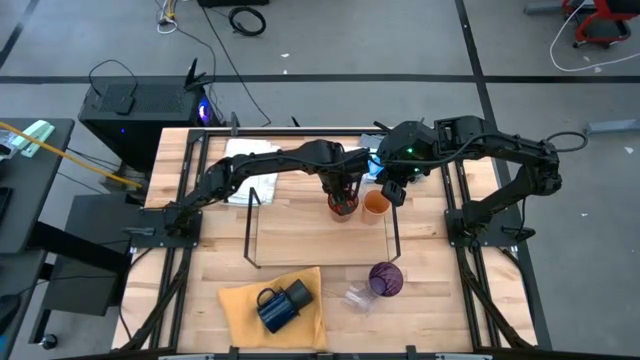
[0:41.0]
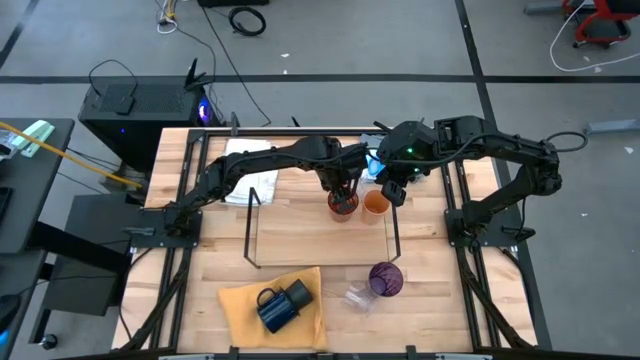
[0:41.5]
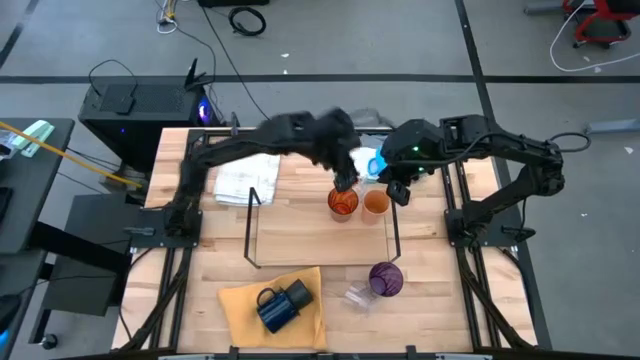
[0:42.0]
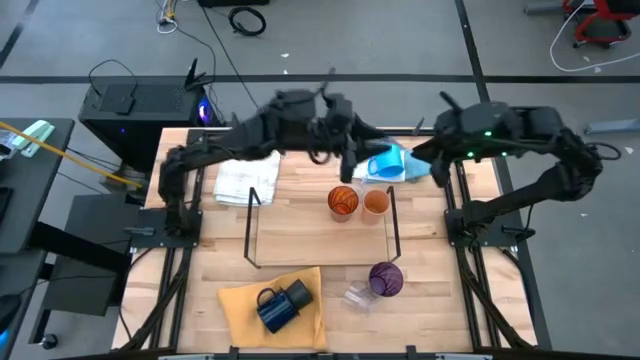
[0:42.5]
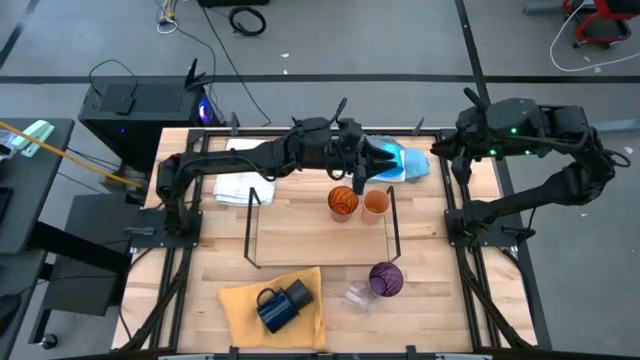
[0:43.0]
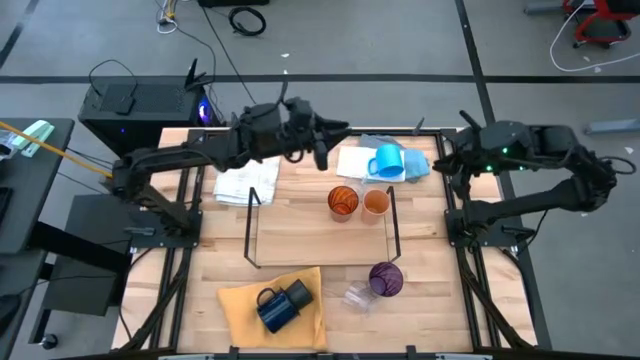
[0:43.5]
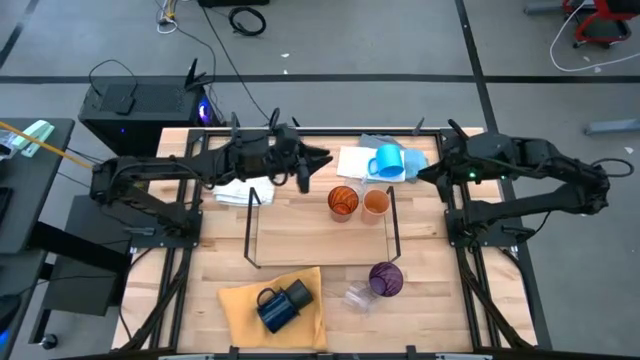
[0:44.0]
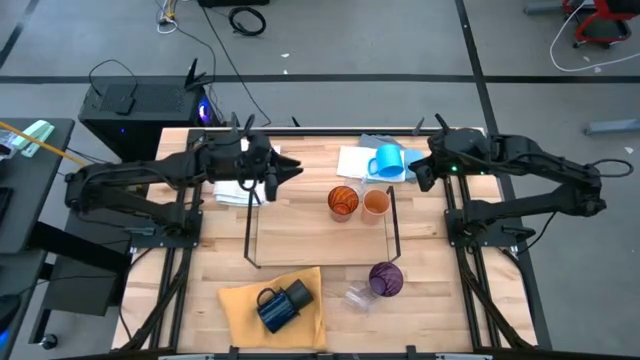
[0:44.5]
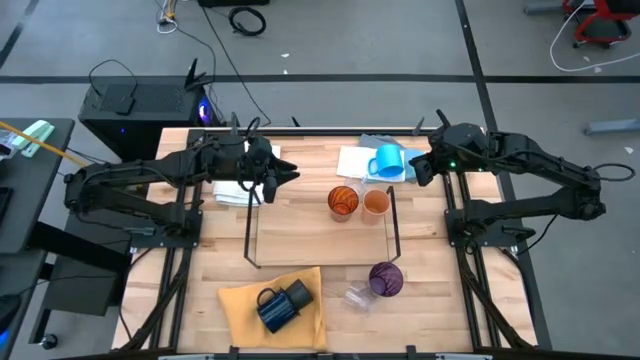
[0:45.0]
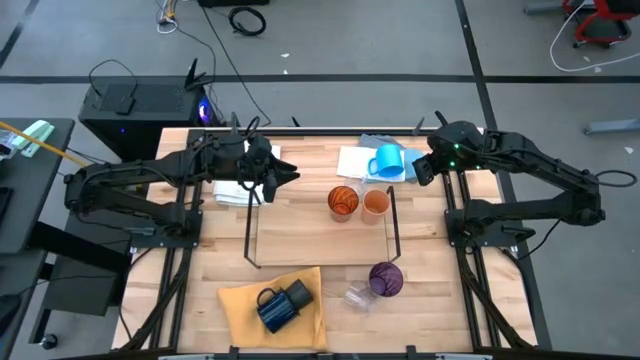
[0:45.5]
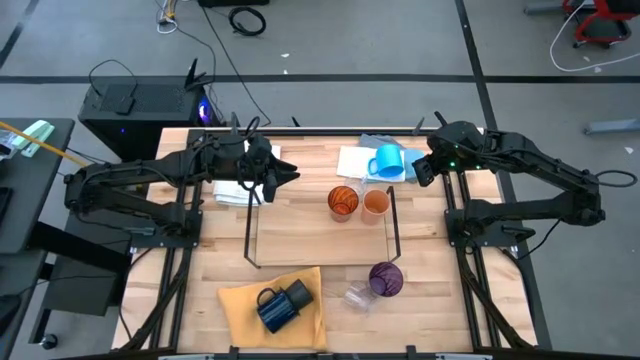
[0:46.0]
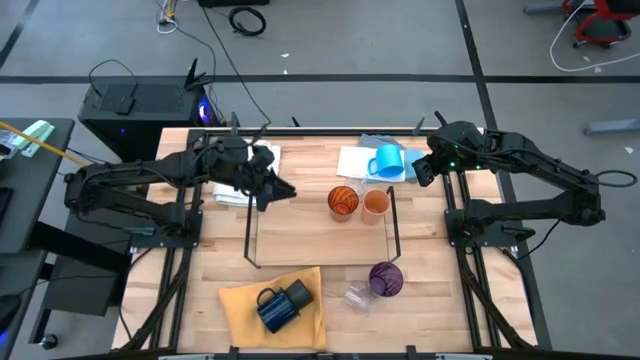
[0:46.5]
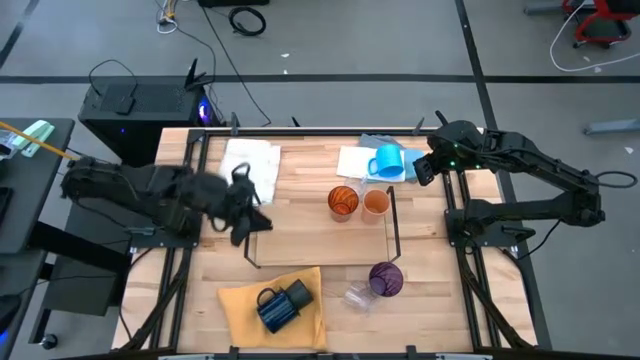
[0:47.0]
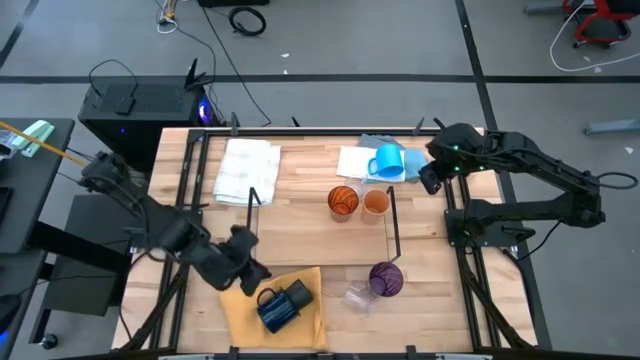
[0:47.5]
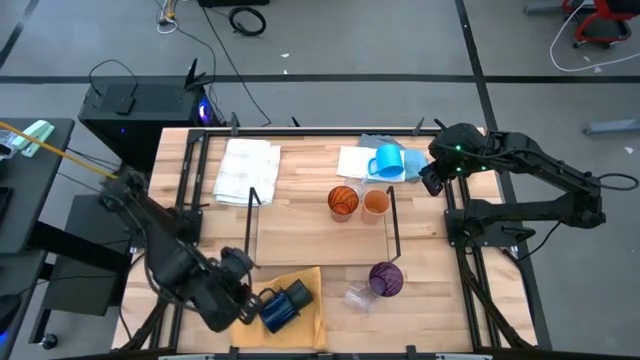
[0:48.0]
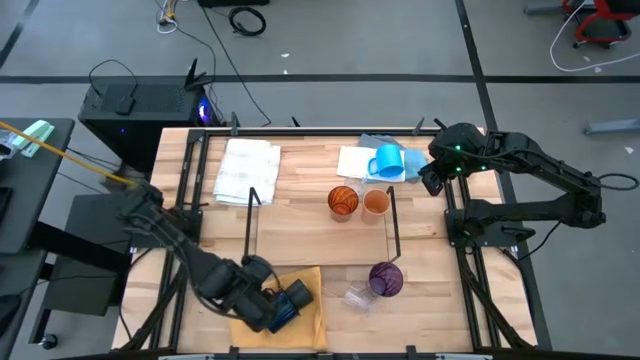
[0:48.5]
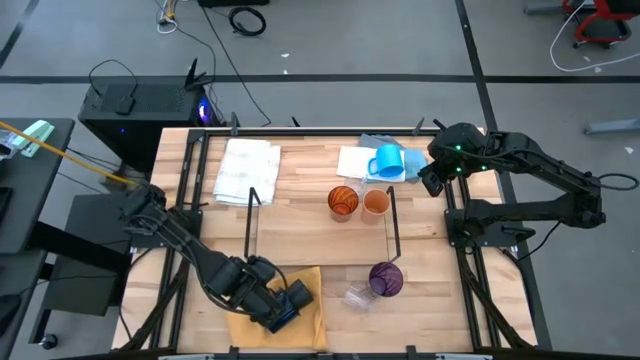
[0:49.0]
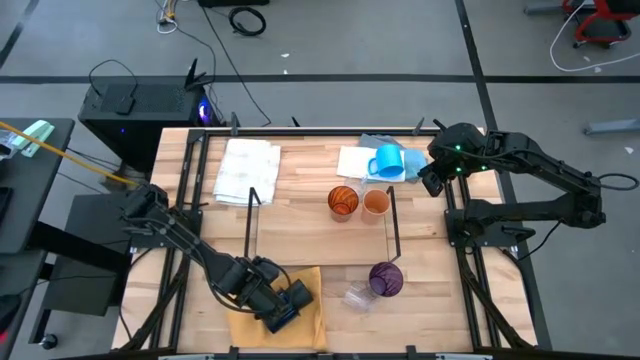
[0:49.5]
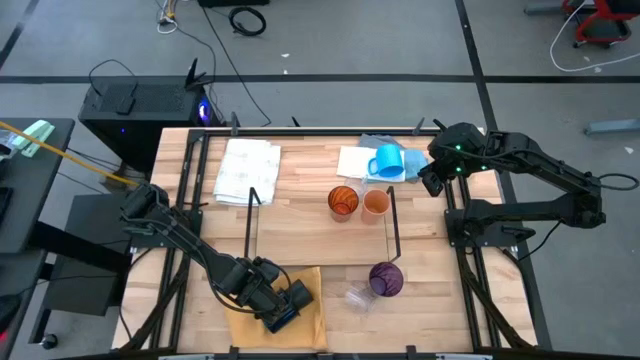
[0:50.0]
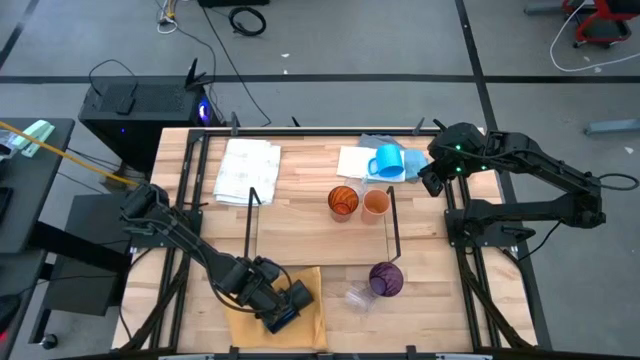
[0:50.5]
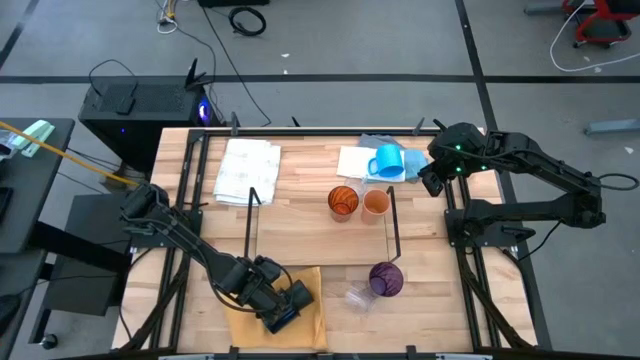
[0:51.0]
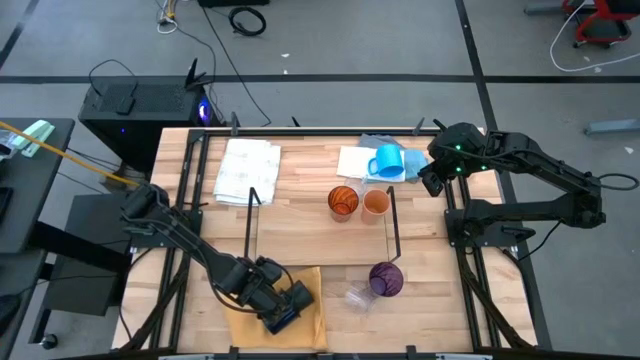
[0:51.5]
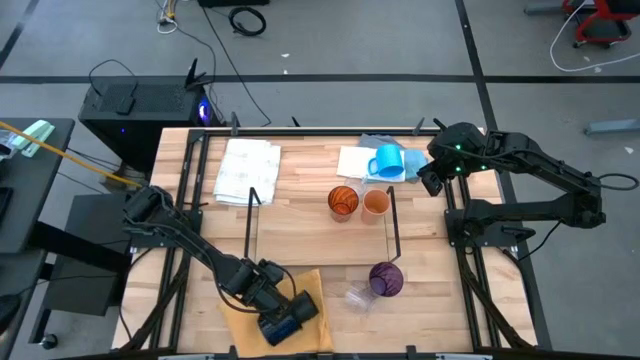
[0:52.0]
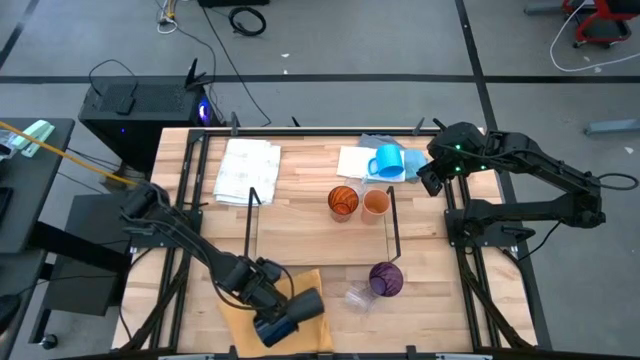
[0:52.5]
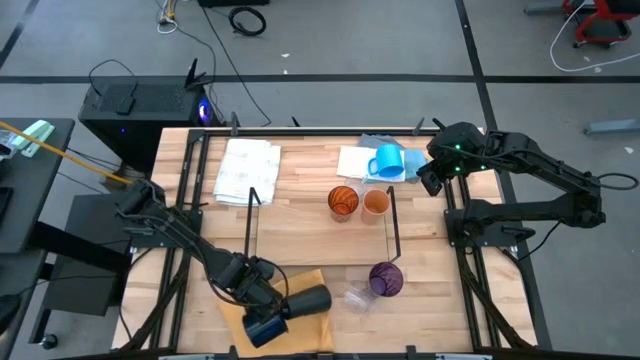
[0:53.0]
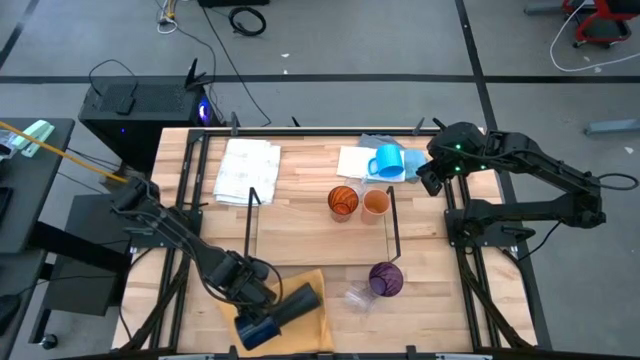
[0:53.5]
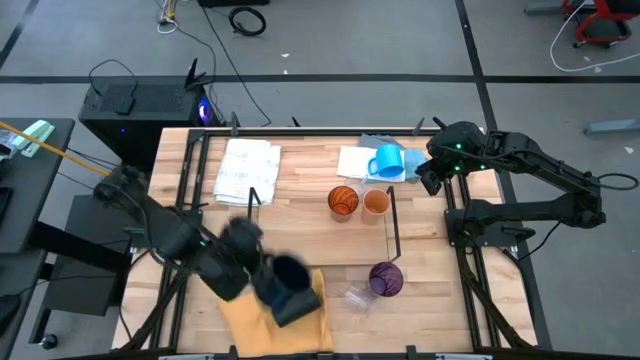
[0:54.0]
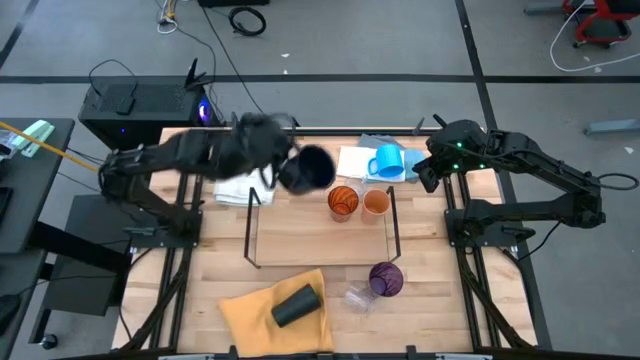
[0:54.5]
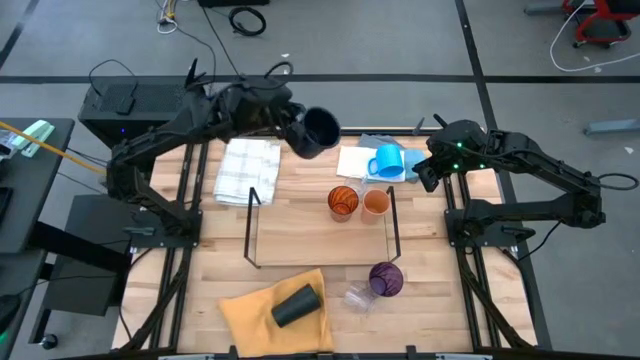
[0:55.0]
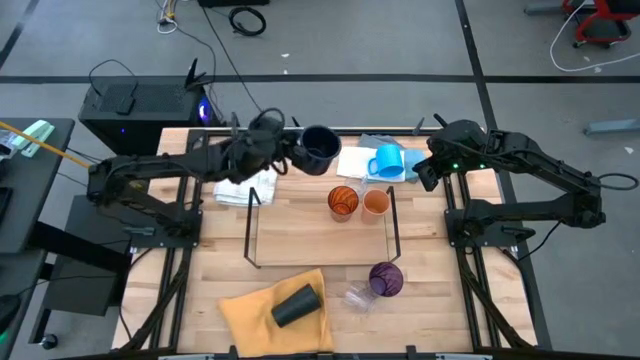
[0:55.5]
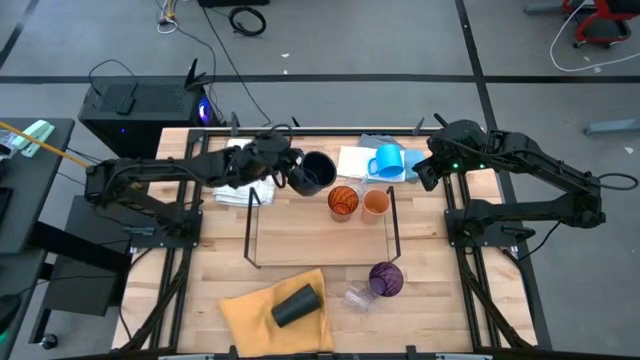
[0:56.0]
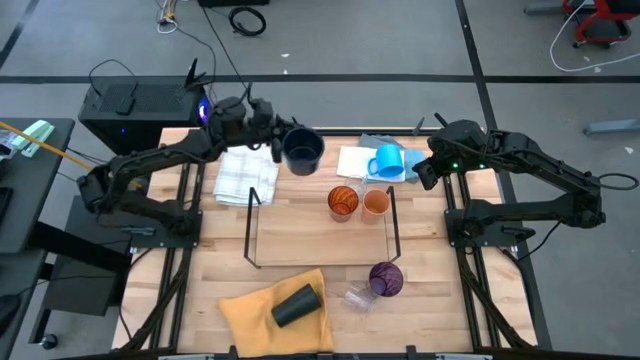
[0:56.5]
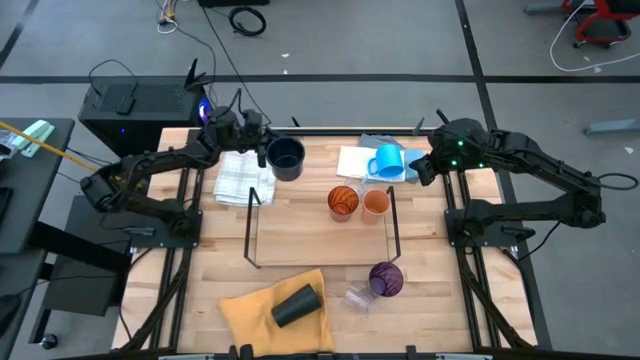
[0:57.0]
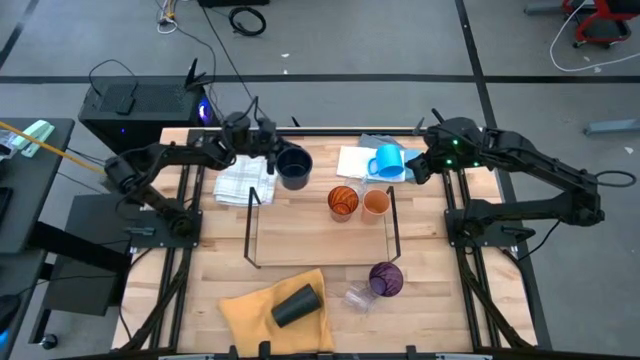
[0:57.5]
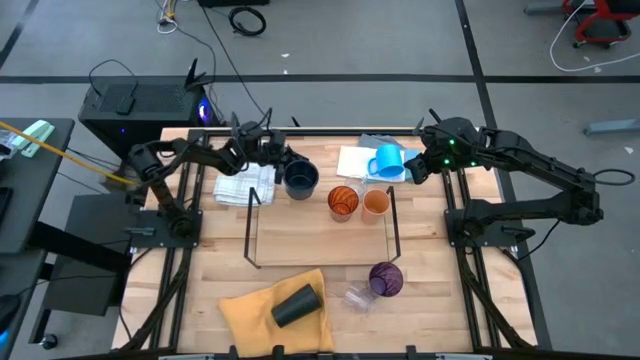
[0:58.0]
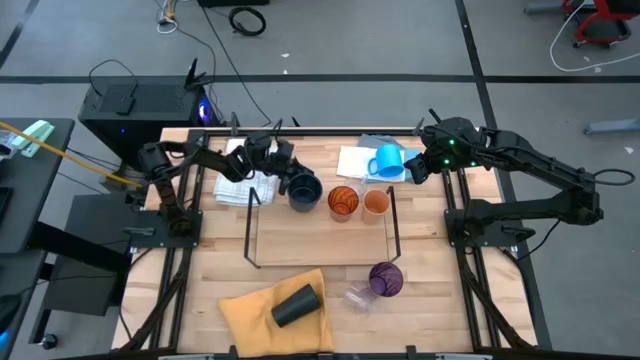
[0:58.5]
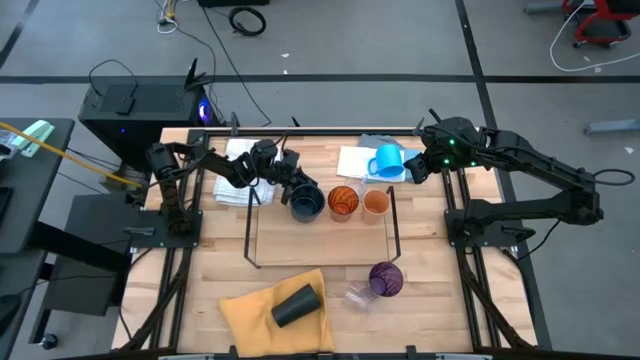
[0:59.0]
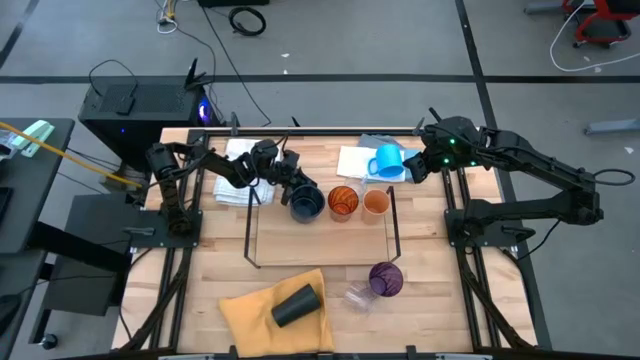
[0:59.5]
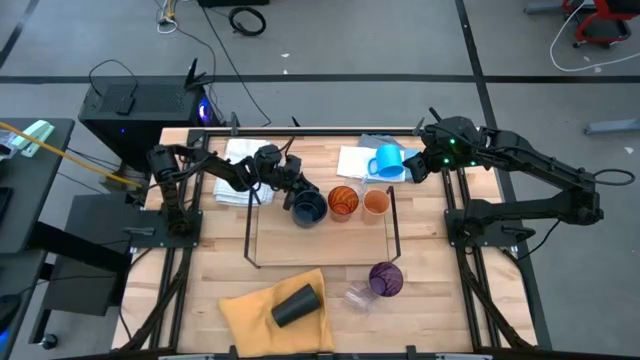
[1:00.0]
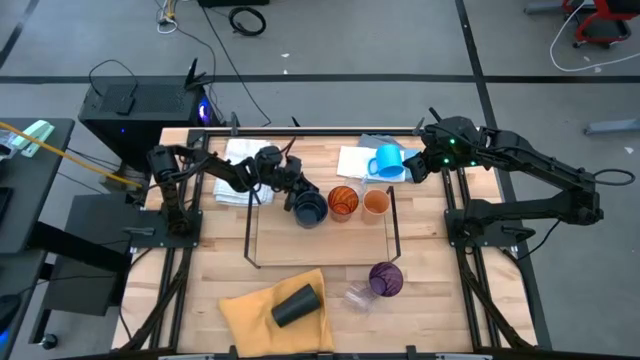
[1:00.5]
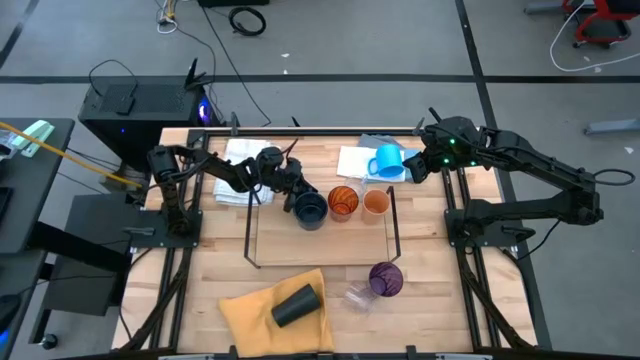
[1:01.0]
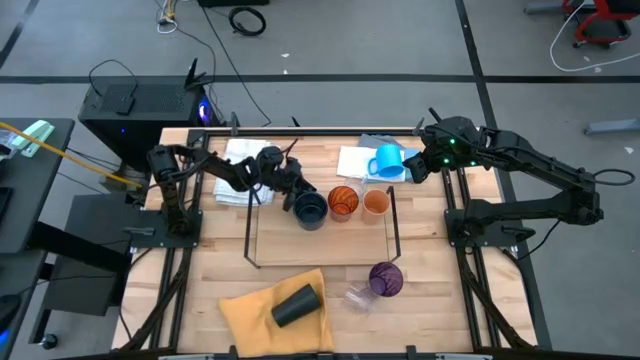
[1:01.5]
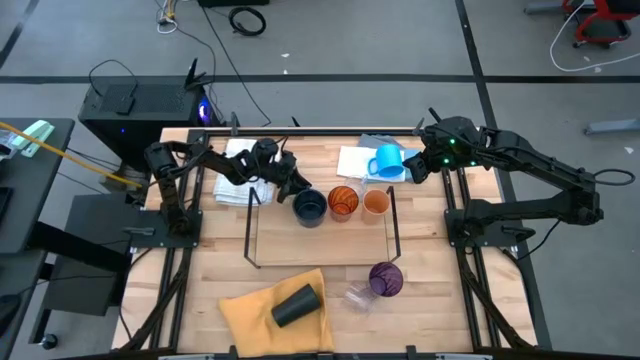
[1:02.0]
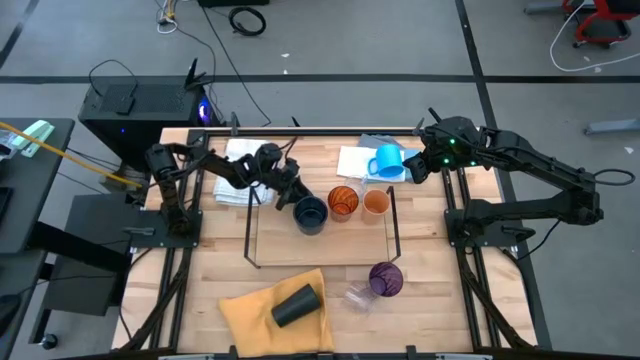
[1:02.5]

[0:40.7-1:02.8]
Task: Stack small to large cups/mugs on shelf
Put the dark blue cup on the shelf
